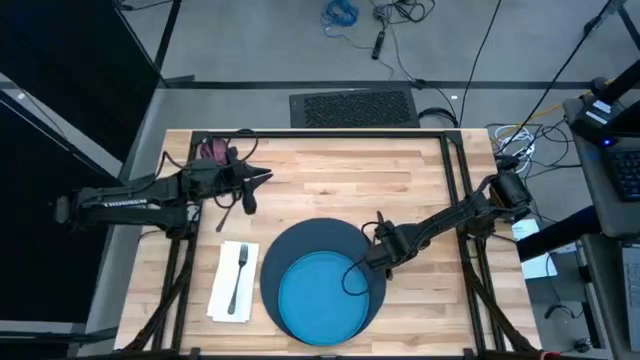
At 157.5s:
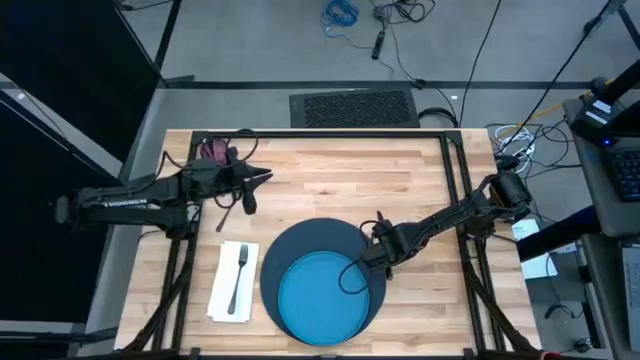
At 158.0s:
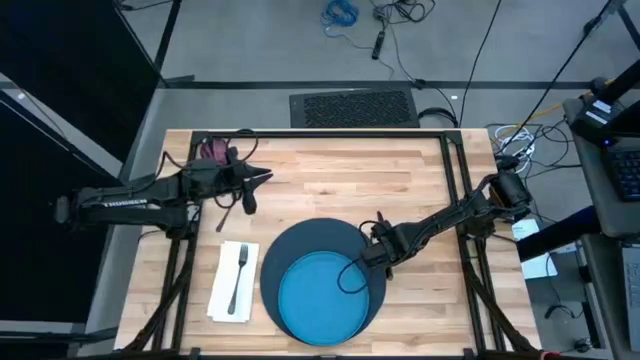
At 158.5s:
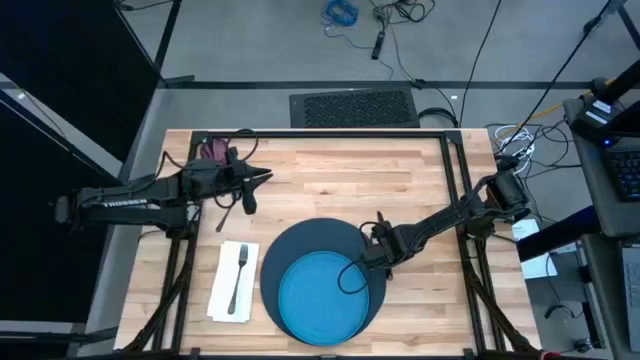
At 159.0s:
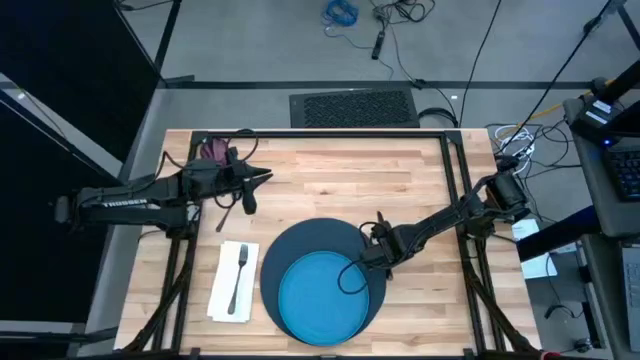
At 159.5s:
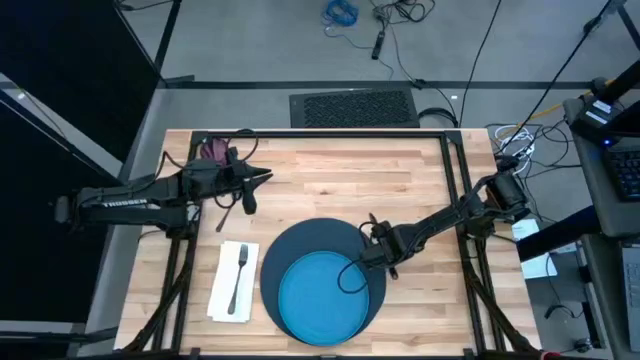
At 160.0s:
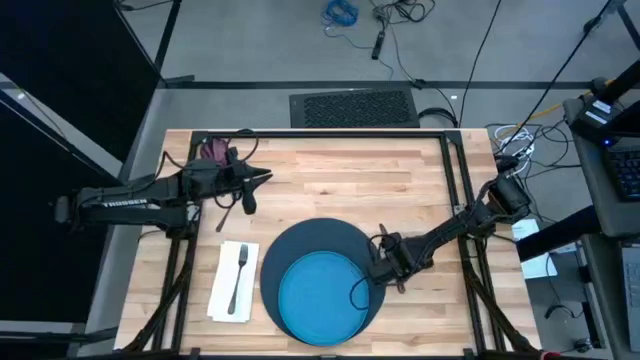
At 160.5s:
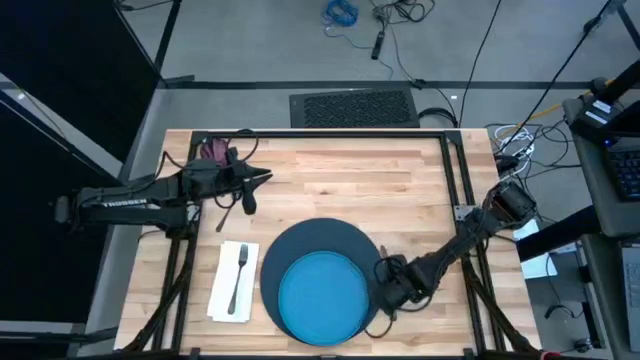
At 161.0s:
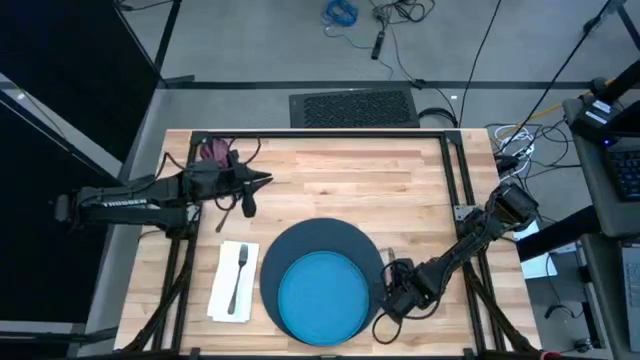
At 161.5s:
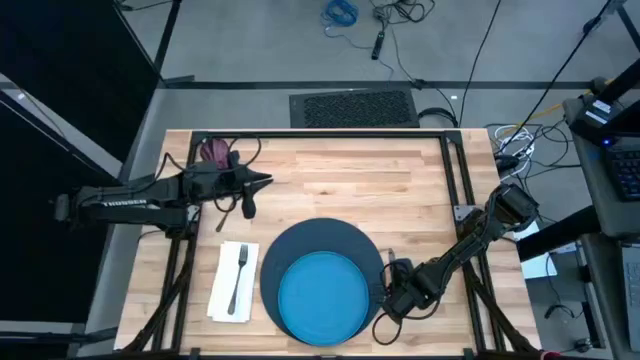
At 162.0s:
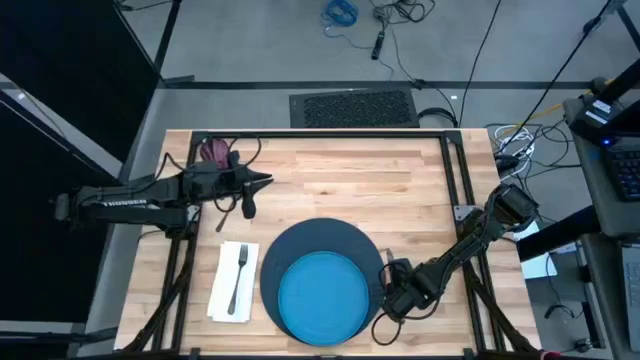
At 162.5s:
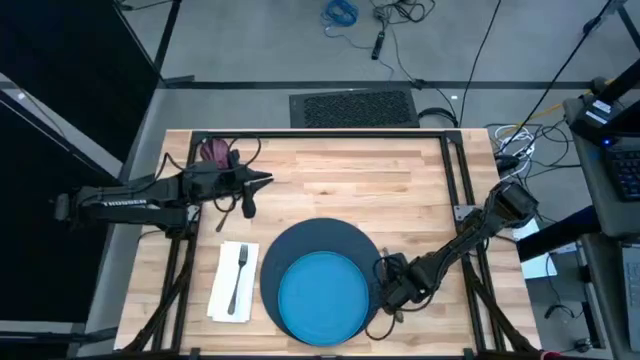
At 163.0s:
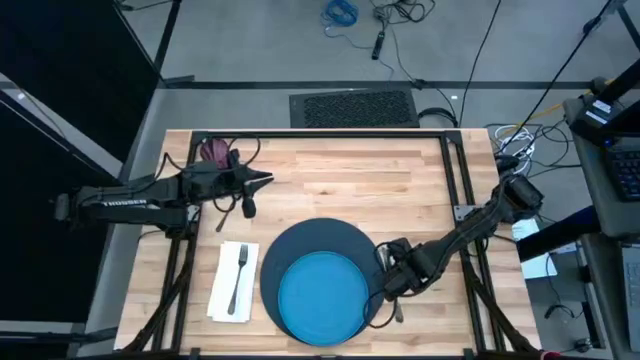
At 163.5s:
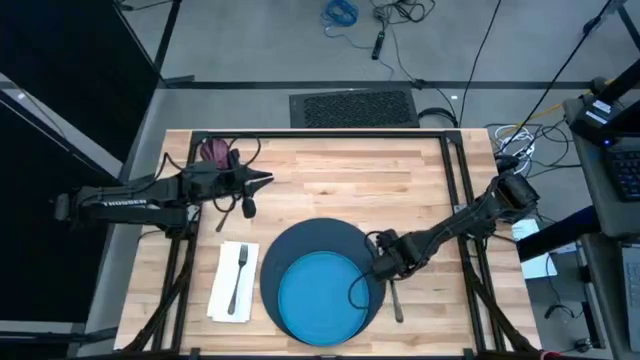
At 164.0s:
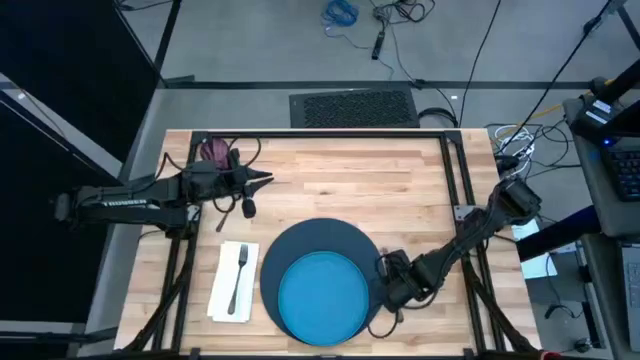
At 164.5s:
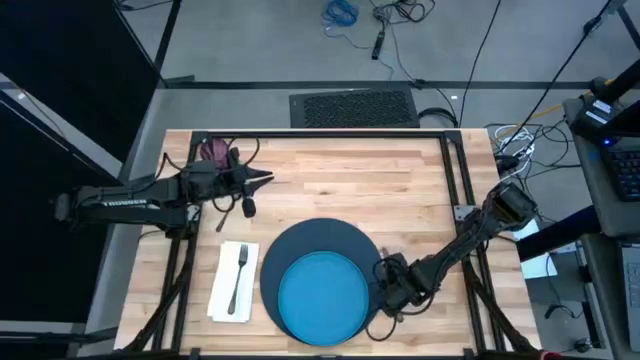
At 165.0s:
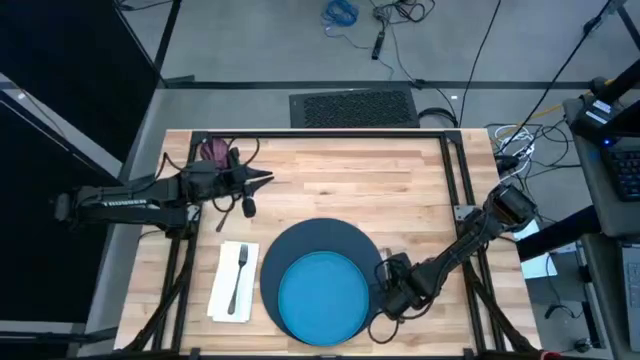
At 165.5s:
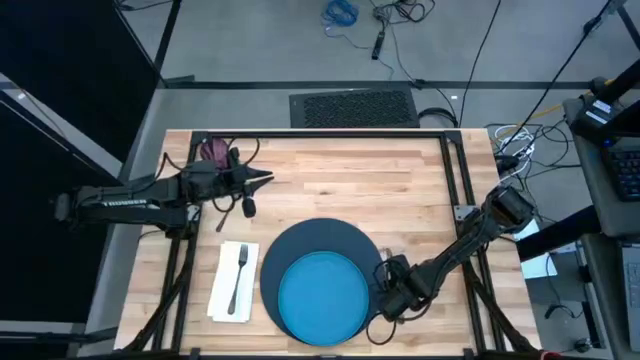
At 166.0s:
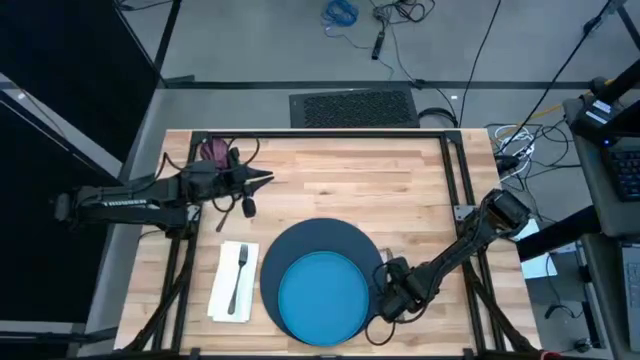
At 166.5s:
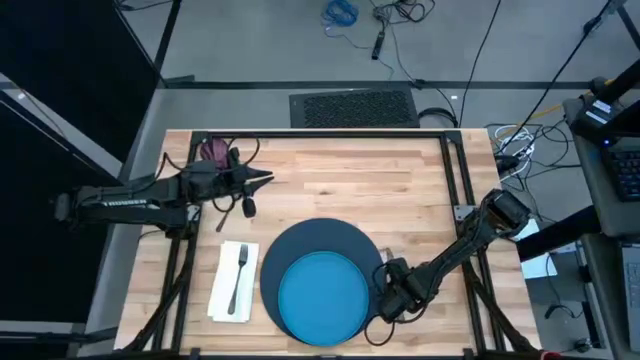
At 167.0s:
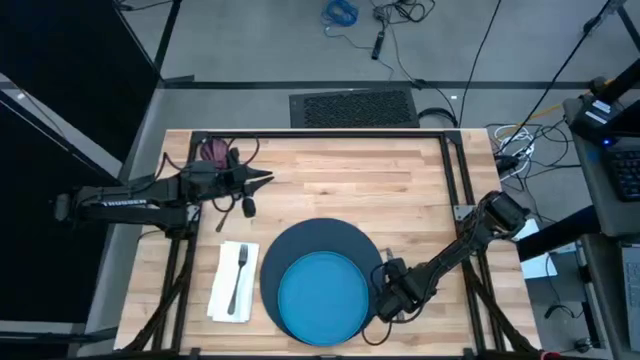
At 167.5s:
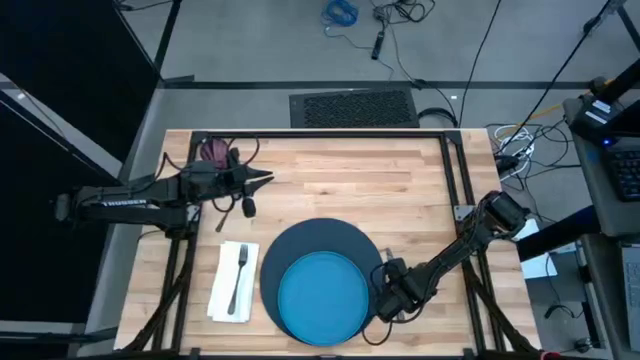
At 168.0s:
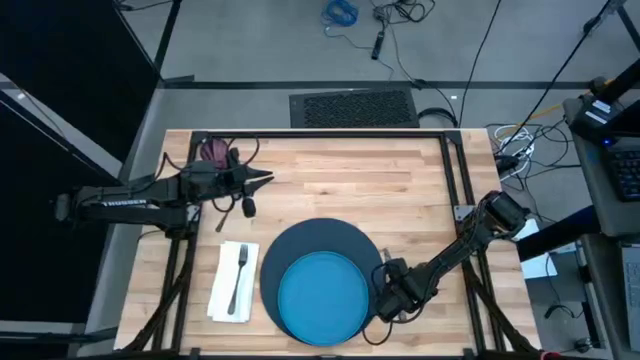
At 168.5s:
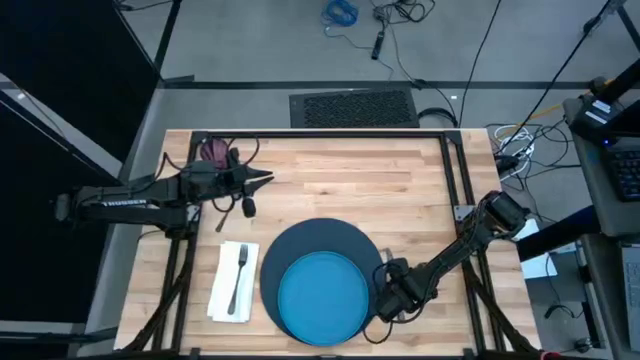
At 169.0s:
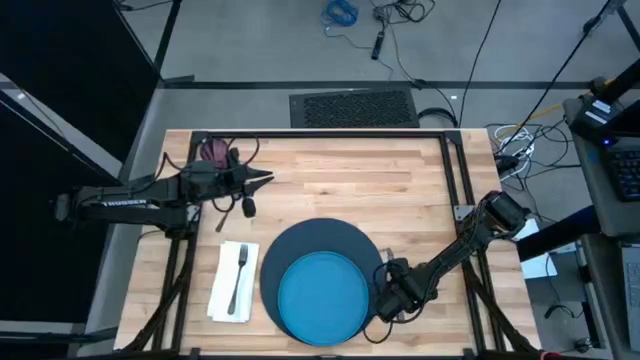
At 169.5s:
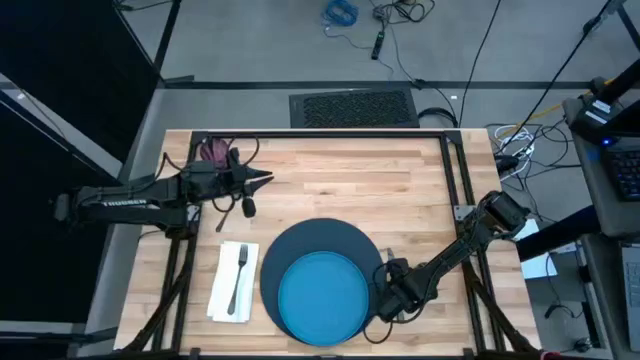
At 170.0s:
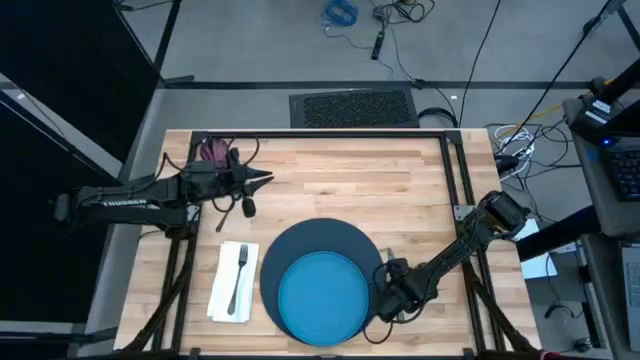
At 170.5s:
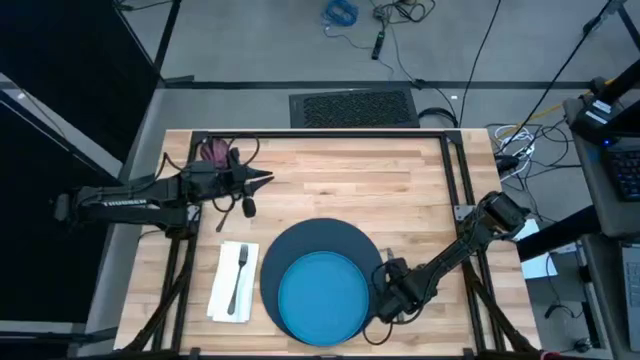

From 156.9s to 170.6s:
Task: Set table place
Move the table knife to the right of the table mat

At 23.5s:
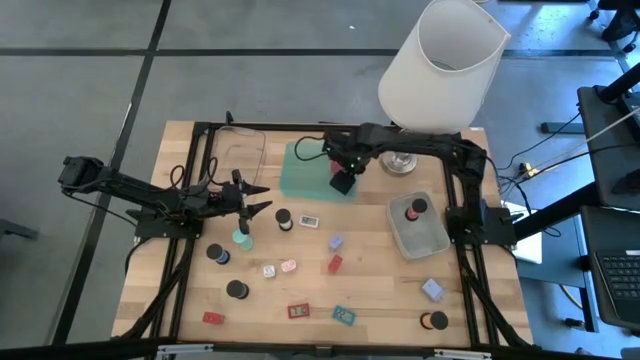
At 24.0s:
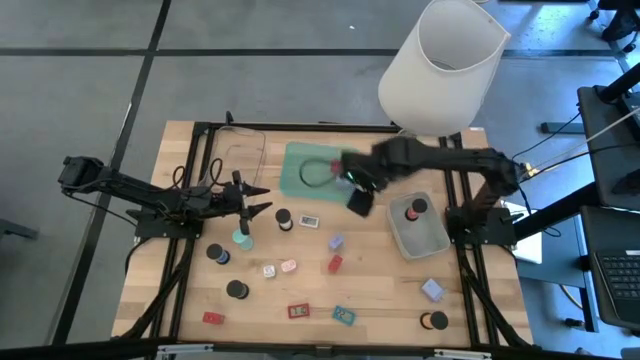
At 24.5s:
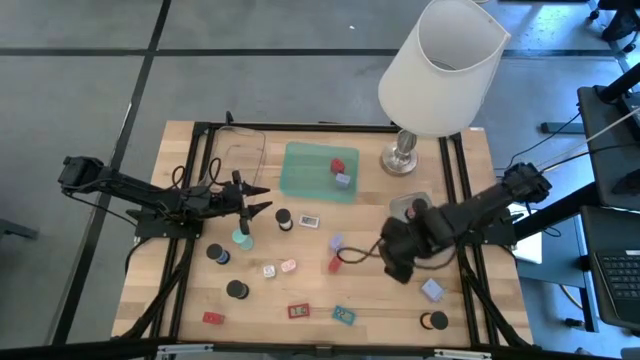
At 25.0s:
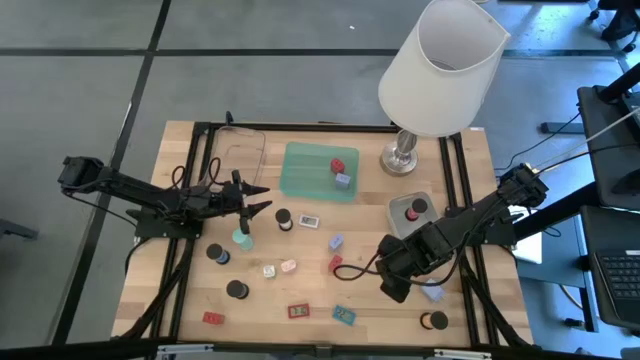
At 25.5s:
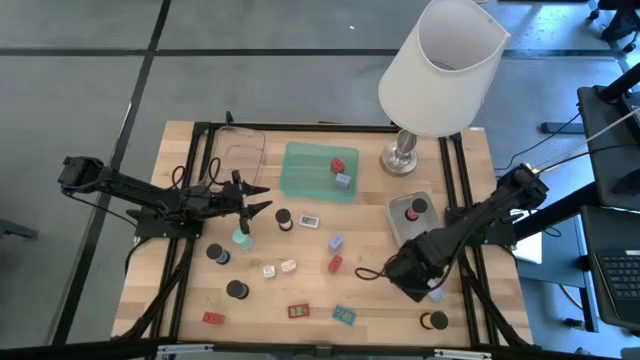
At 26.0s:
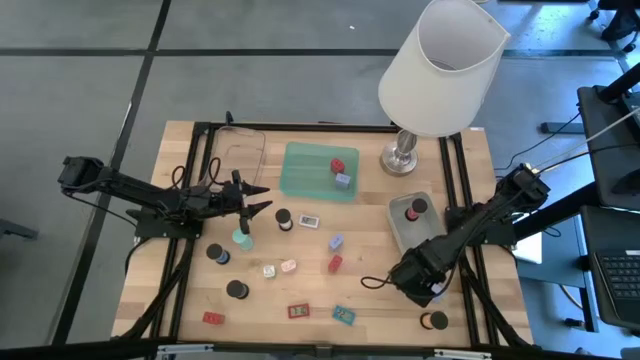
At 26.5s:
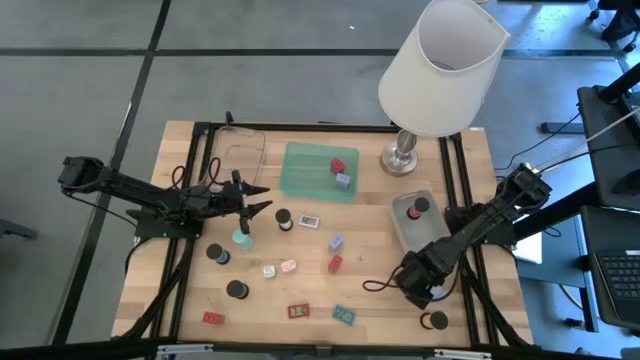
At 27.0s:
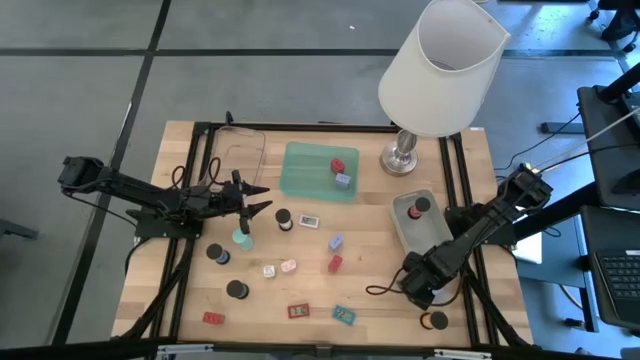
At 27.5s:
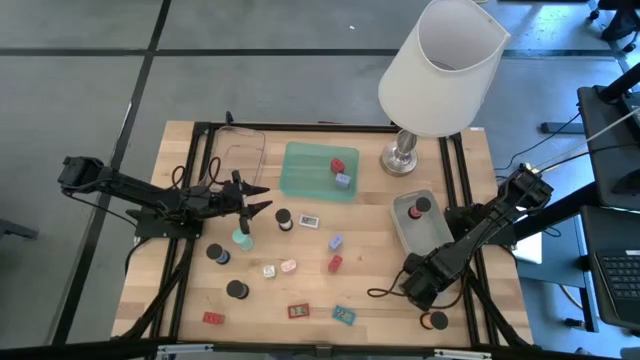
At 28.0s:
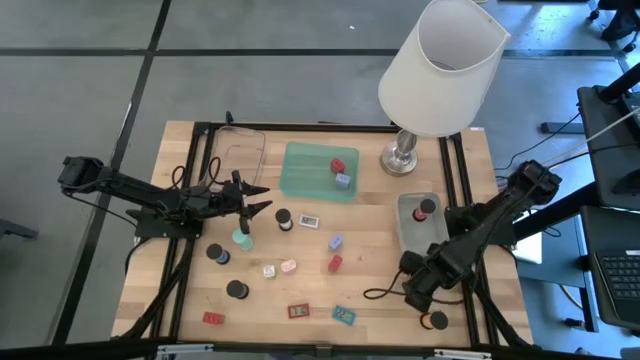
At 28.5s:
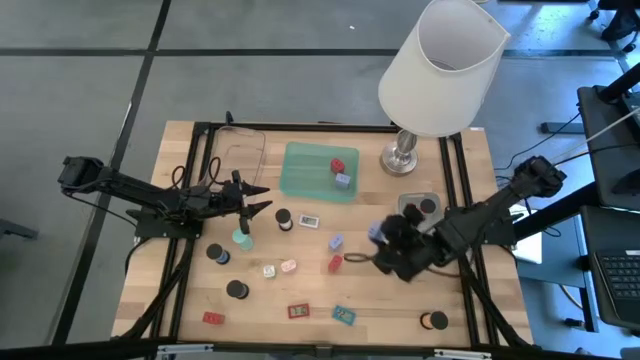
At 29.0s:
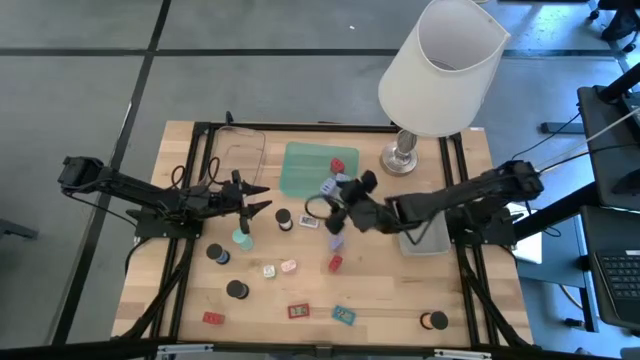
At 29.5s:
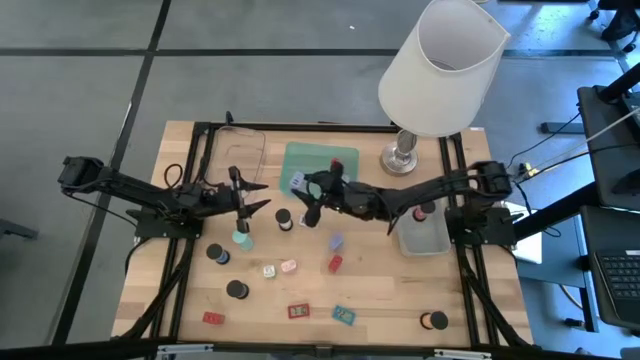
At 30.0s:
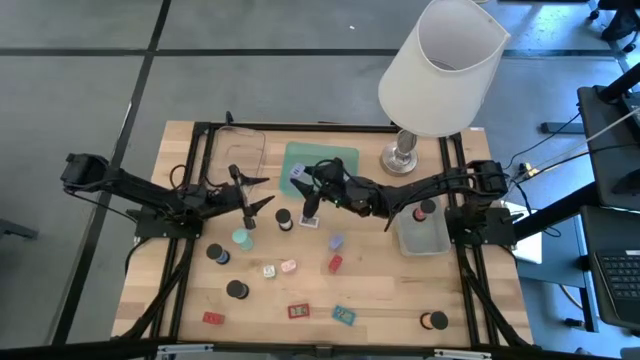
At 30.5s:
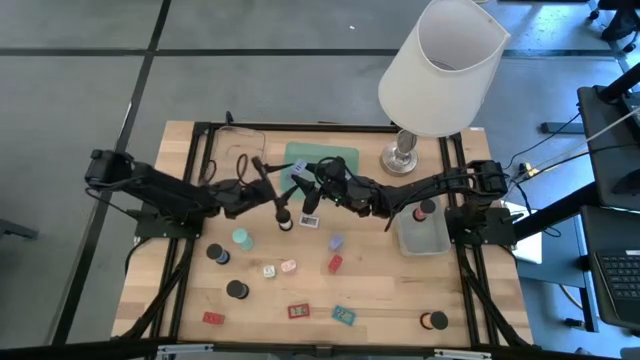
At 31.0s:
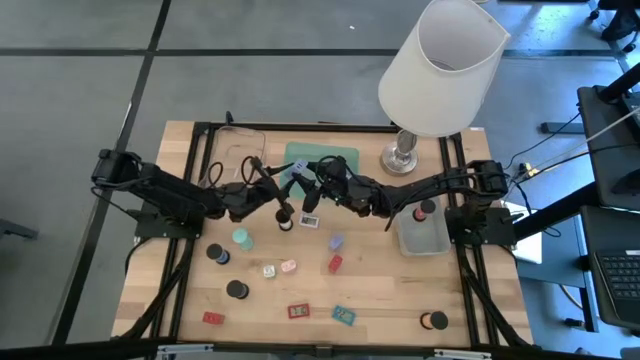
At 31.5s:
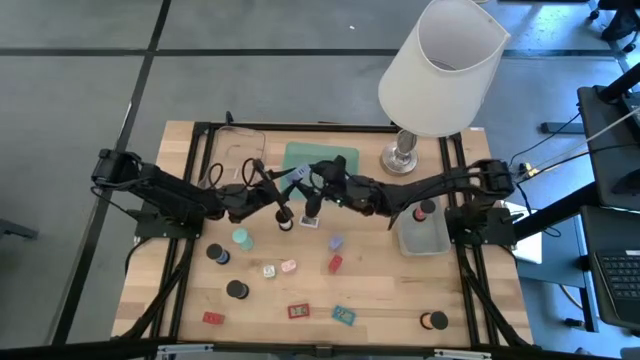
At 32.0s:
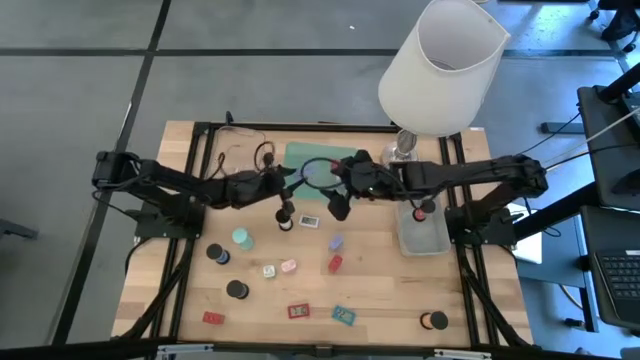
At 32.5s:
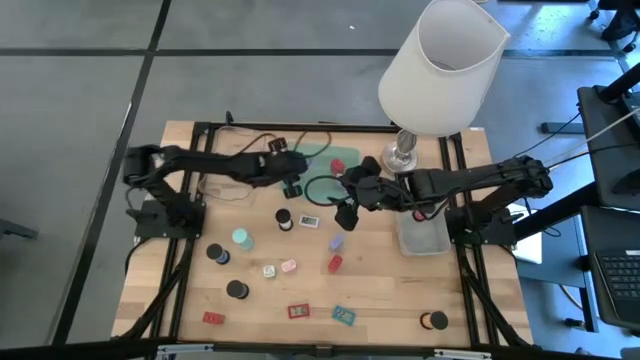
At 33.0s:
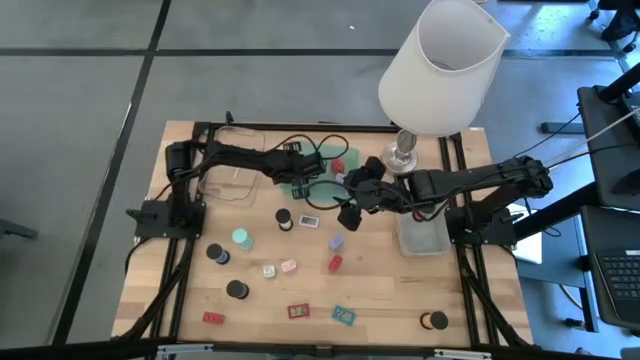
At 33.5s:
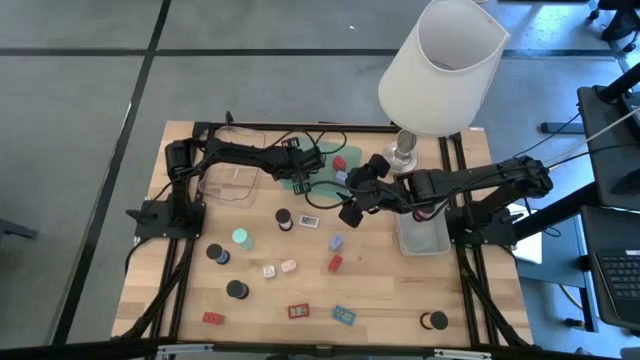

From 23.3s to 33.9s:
Task: Pick & Place Office items
Put the right blue charger adapter into the green bin
